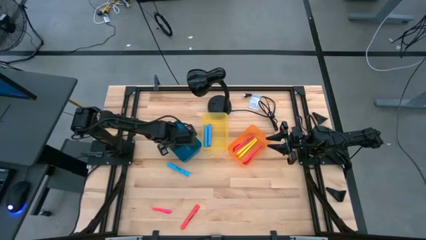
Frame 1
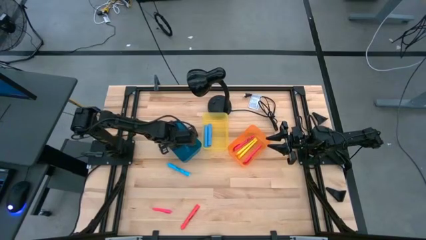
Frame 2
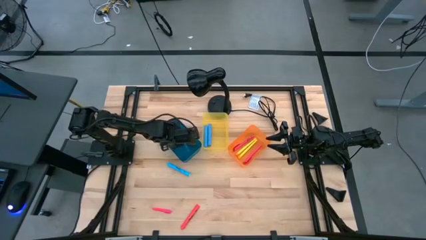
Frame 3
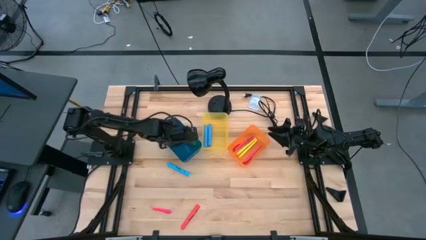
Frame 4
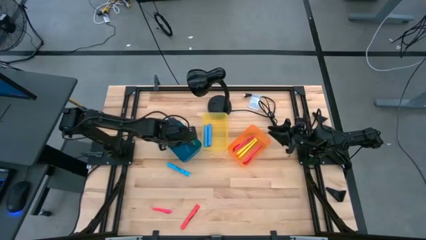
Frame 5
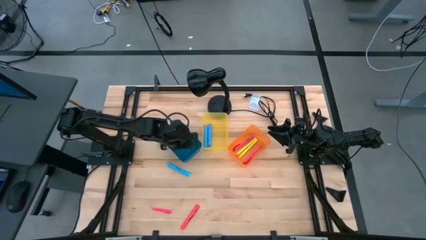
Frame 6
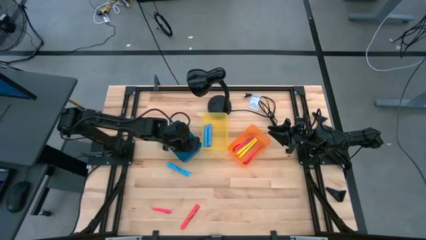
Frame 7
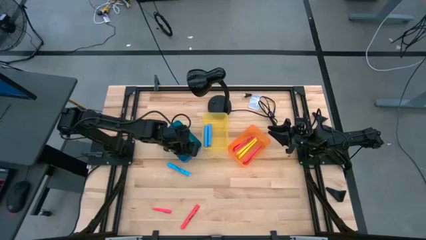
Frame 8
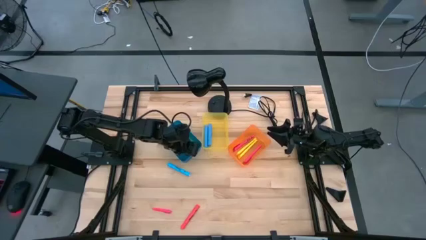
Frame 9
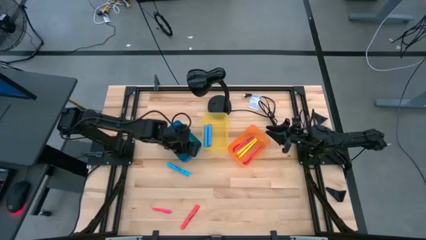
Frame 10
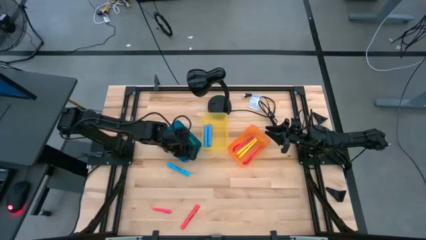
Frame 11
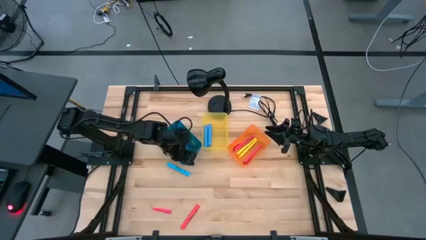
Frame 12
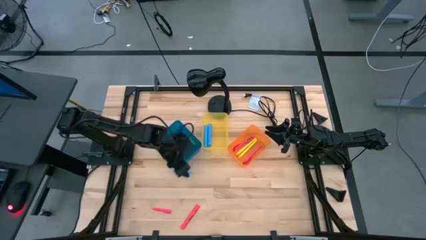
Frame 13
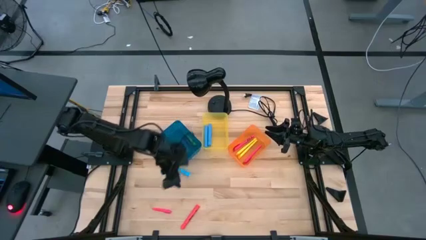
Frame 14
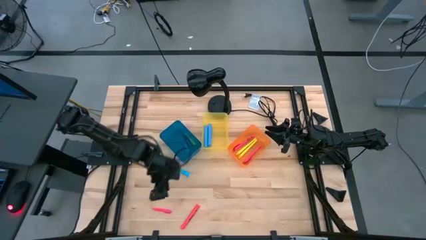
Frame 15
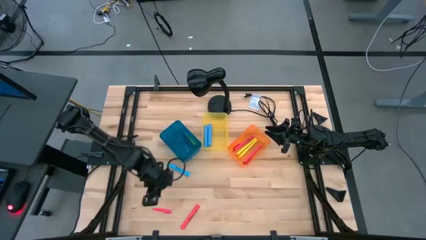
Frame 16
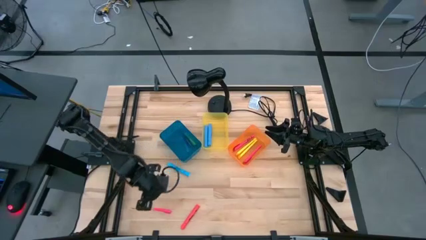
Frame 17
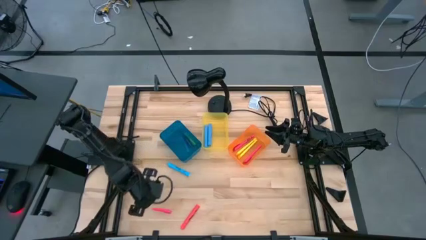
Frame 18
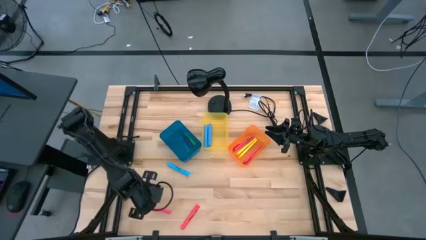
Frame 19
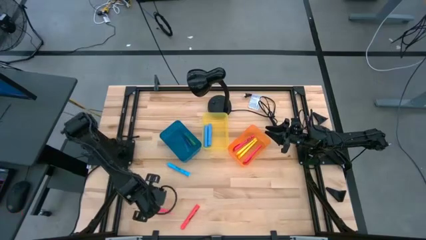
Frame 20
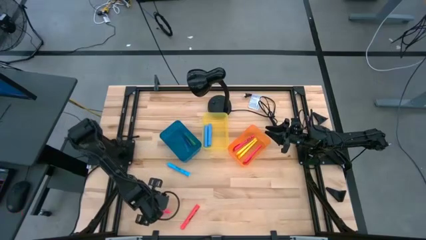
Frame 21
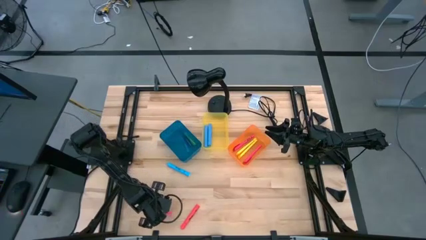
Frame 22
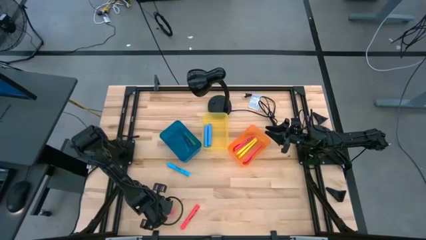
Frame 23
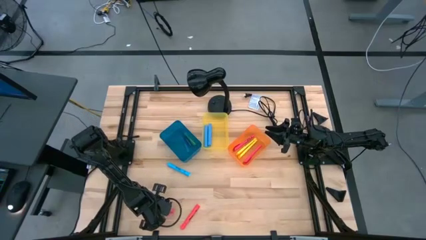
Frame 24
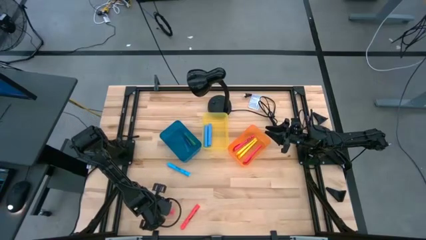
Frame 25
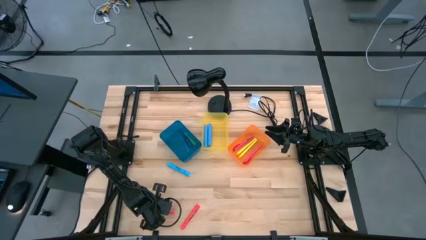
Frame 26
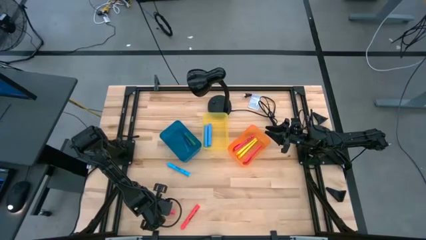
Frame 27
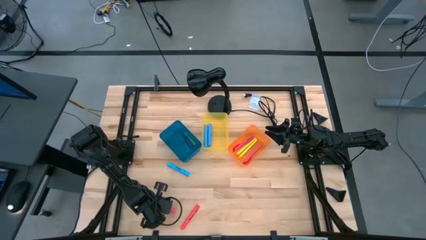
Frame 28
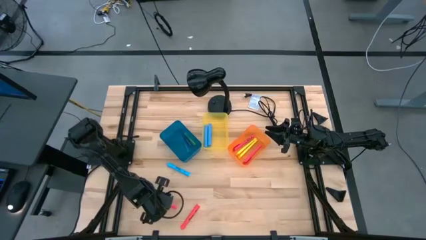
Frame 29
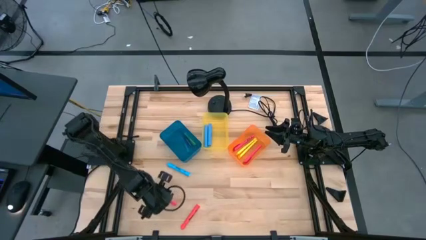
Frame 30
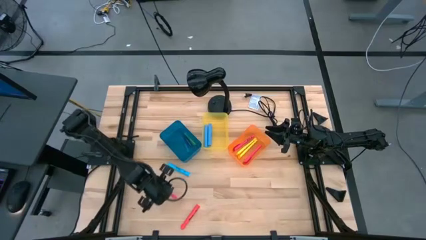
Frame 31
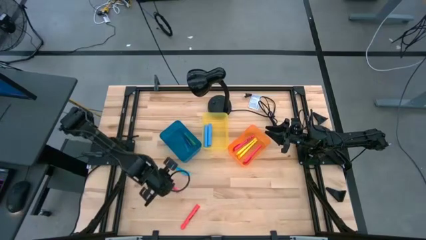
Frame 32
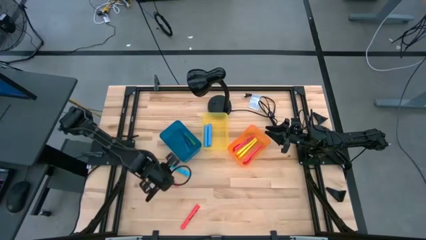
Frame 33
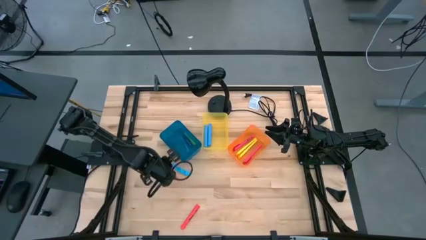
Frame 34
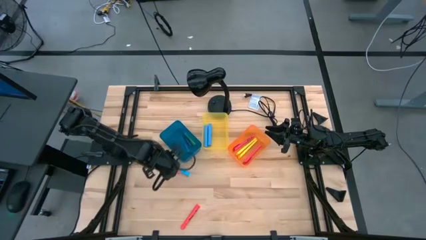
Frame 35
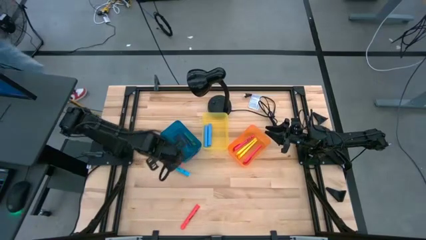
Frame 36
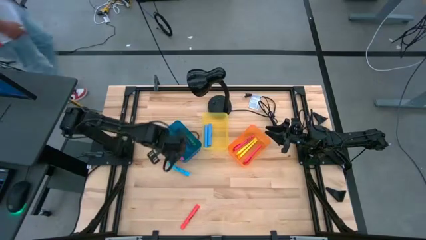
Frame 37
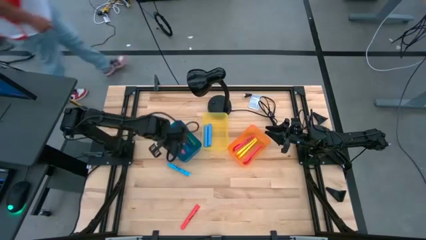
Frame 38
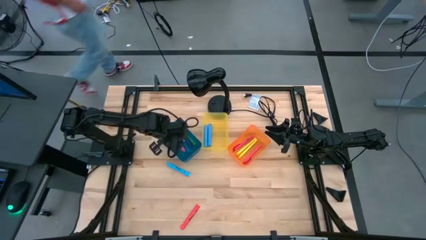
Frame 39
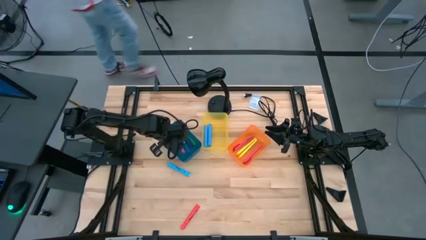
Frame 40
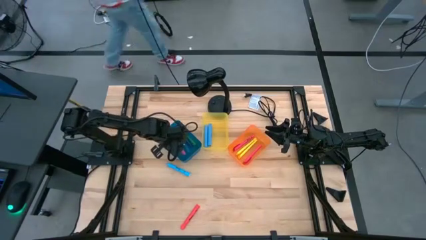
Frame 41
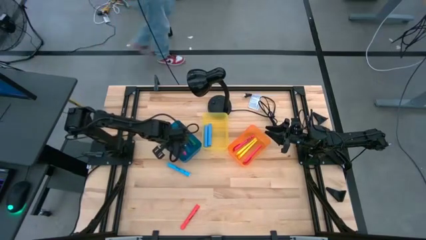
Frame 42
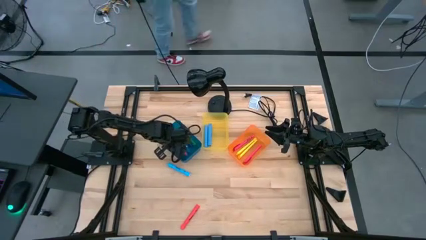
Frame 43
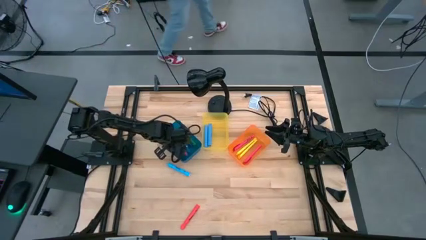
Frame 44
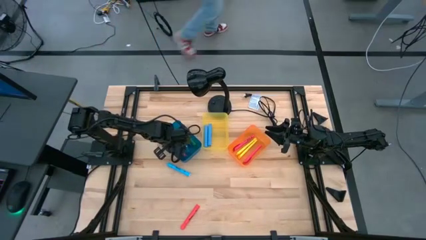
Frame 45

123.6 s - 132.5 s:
Task: Pick & Place Markers
Put the pink transparent pen into the blue bin

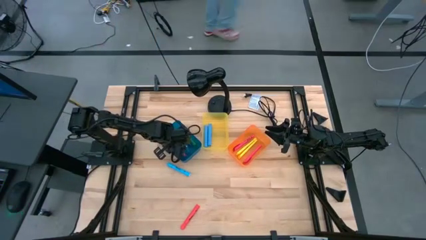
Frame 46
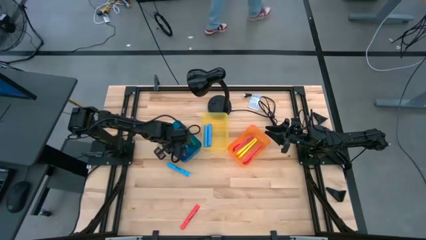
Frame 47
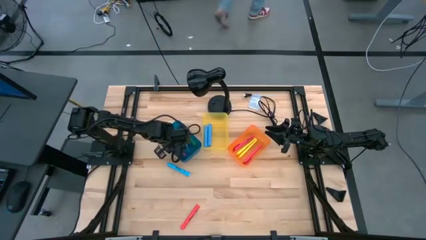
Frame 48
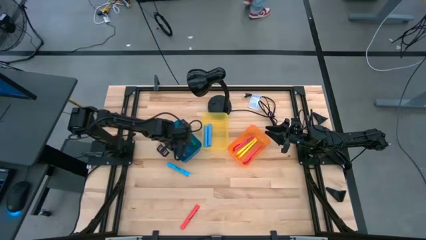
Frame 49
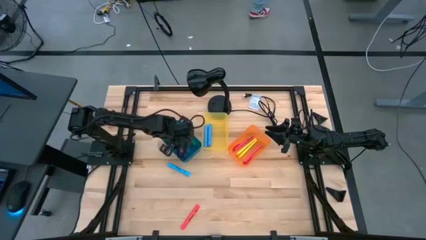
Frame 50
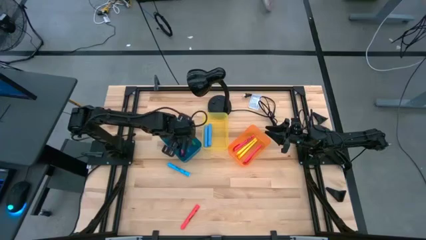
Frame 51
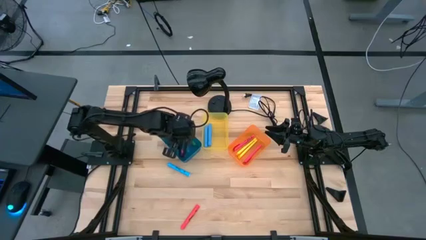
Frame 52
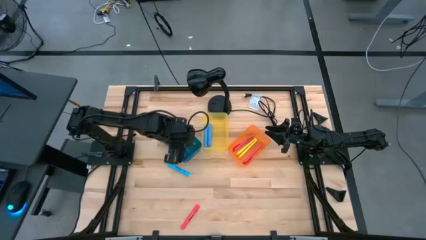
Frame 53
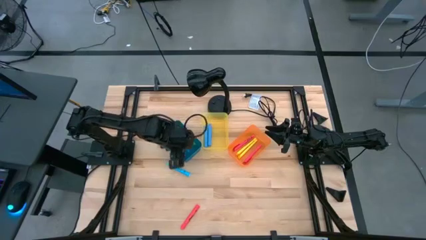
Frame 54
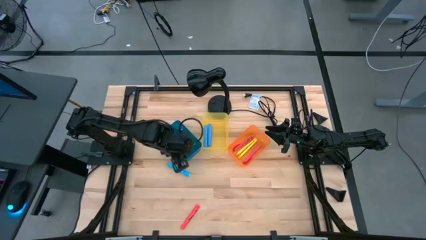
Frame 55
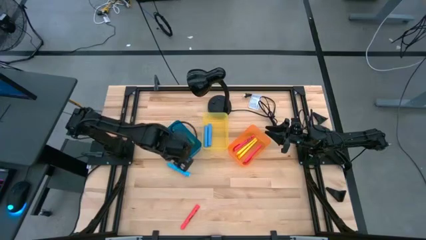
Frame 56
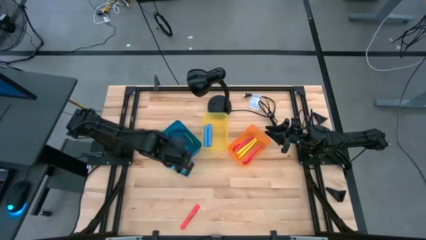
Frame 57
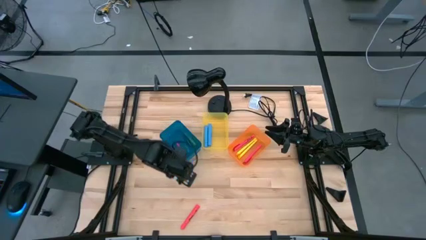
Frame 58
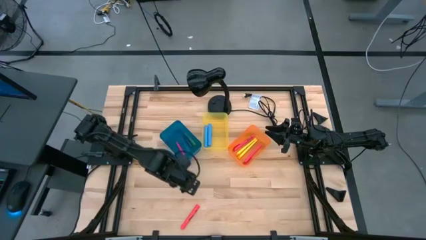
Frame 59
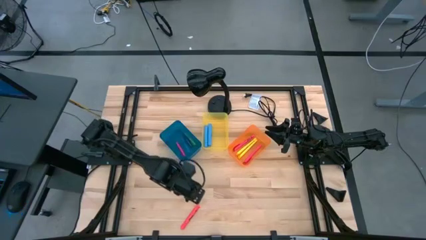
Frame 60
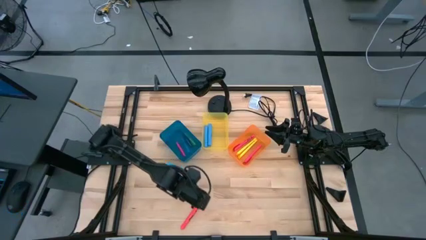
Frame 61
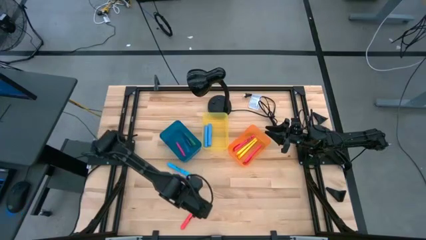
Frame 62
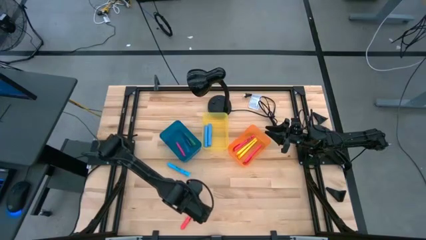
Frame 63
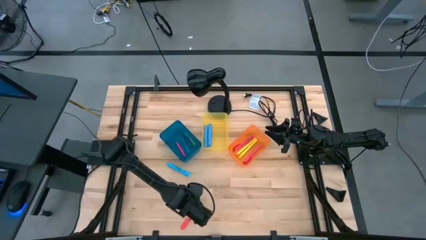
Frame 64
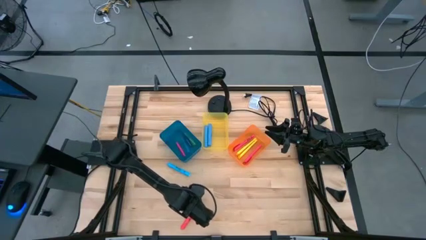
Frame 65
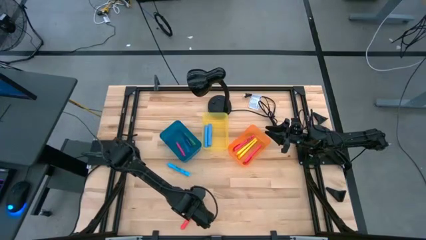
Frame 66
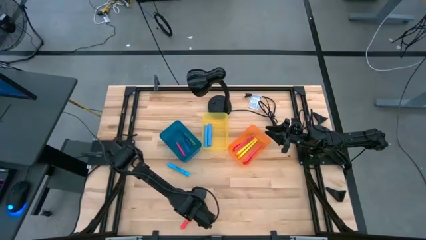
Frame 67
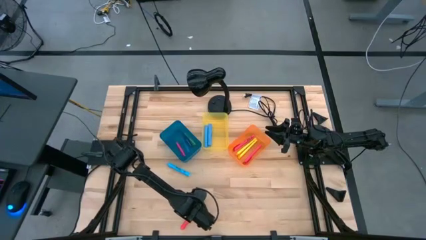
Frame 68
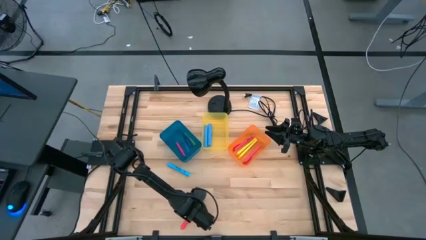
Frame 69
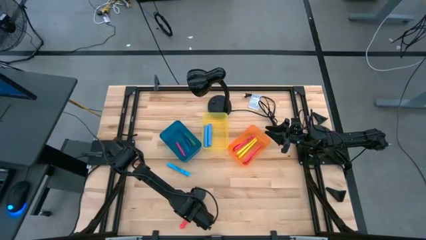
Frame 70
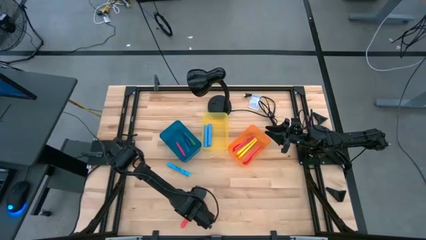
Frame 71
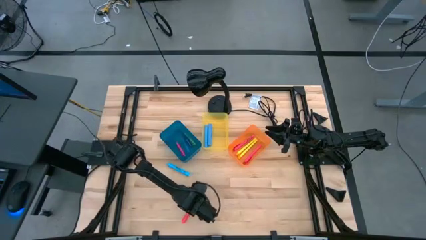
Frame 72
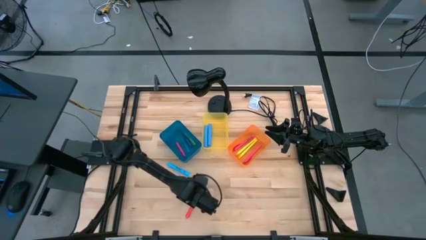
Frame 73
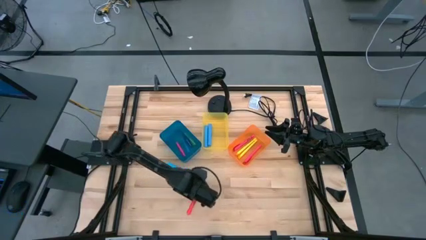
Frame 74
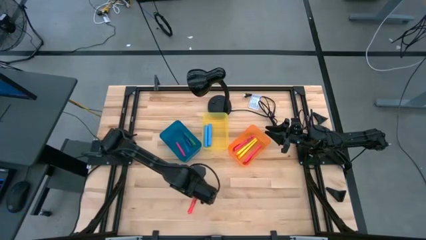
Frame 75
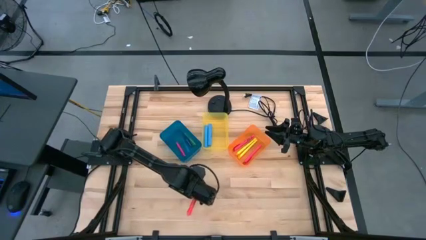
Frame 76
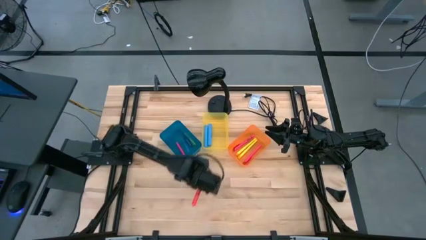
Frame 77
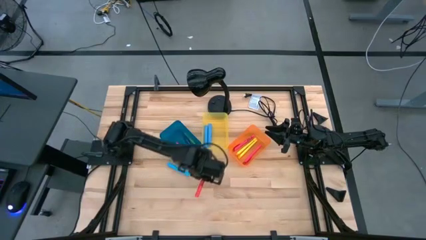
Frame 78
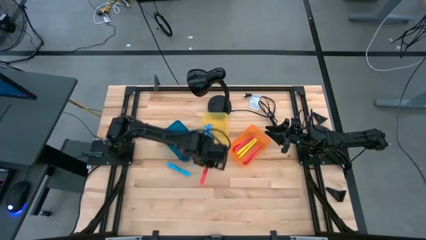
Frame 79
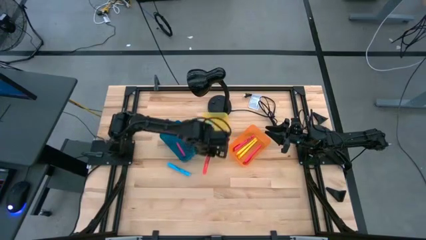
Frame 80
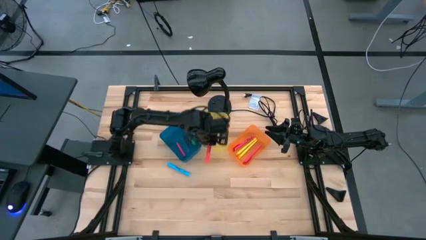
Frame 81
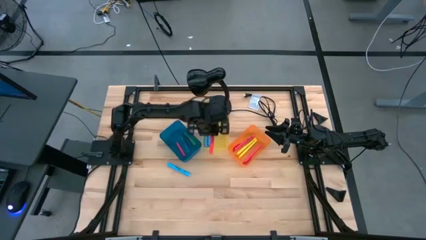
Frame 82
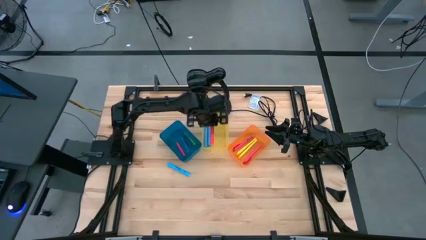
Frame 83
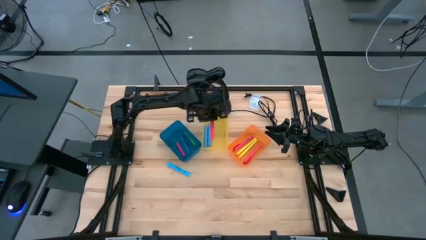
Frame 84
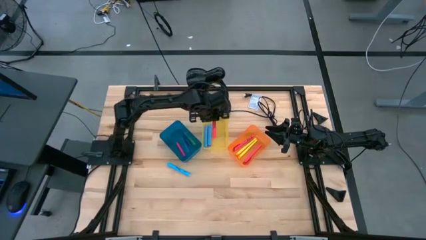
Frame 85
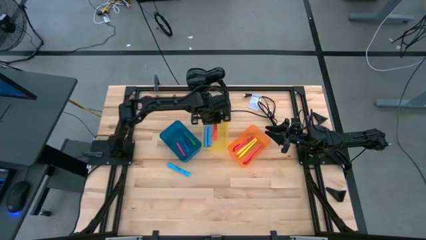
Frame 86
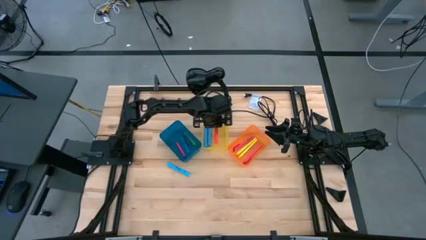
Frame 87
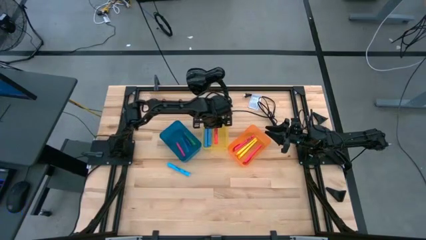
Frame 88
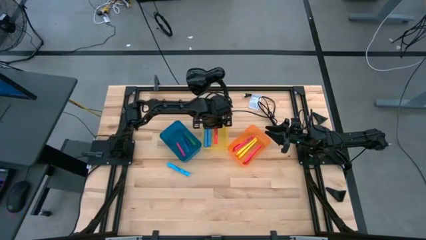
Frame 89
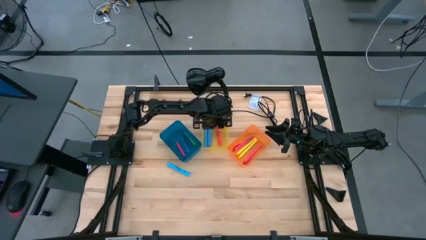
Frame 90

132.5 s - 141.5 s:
Put the pink highlighter pen into the yellow bin
